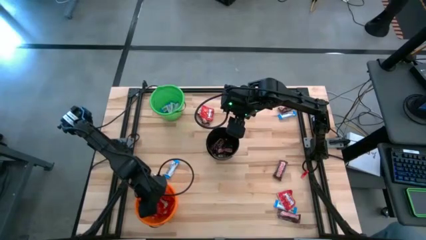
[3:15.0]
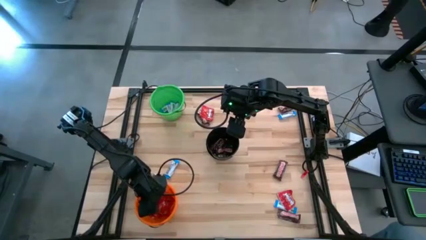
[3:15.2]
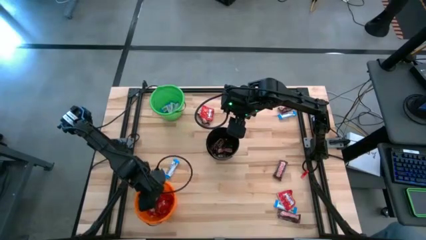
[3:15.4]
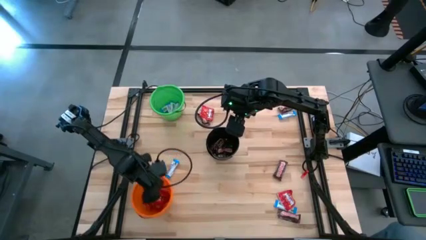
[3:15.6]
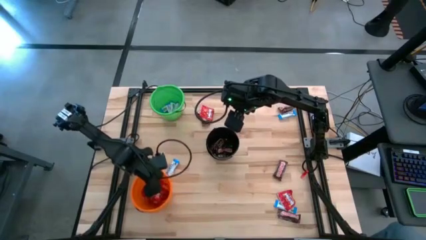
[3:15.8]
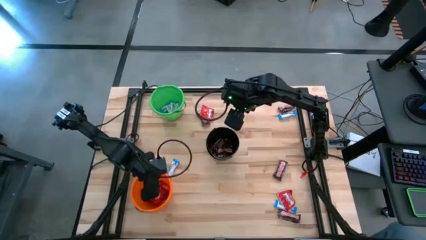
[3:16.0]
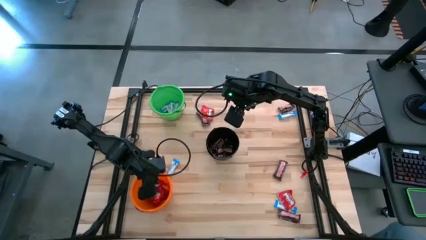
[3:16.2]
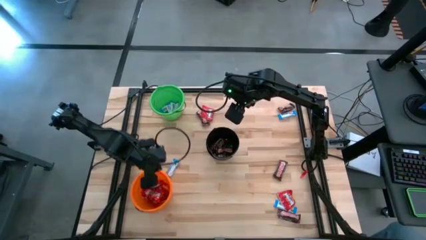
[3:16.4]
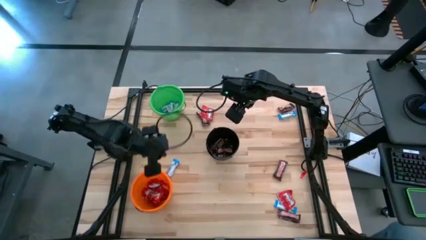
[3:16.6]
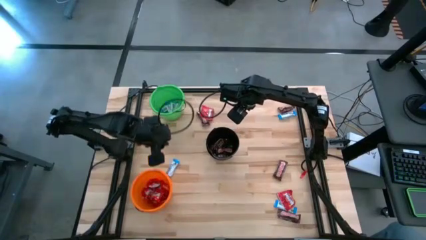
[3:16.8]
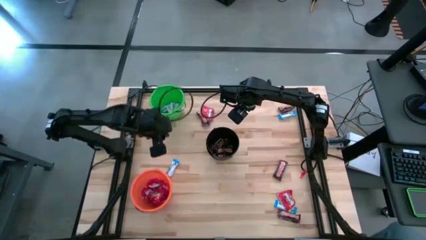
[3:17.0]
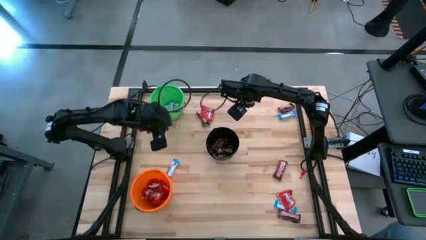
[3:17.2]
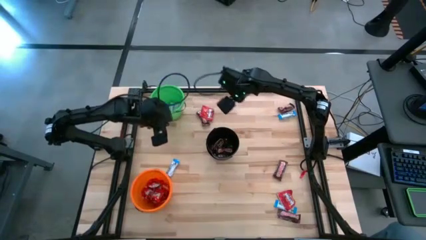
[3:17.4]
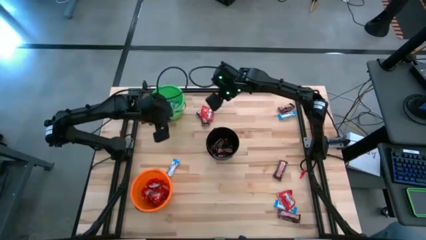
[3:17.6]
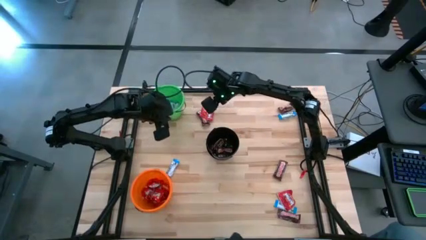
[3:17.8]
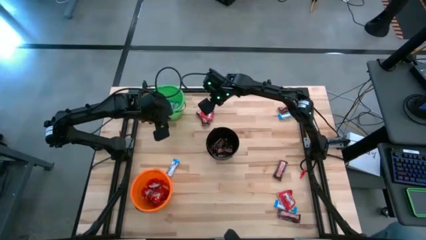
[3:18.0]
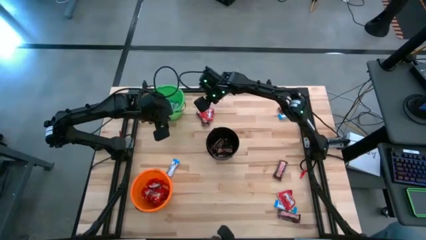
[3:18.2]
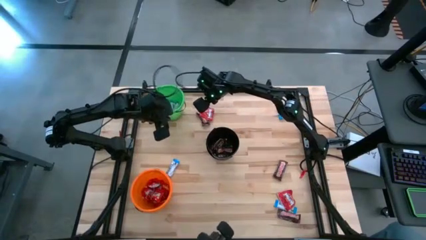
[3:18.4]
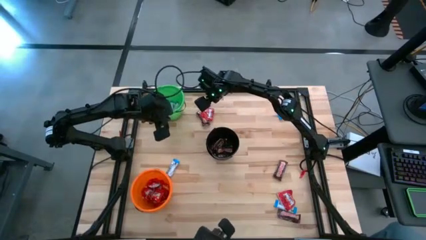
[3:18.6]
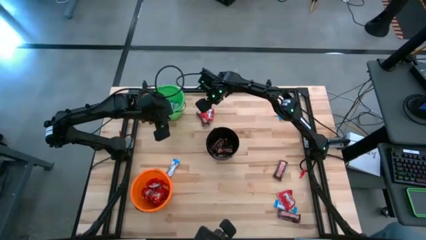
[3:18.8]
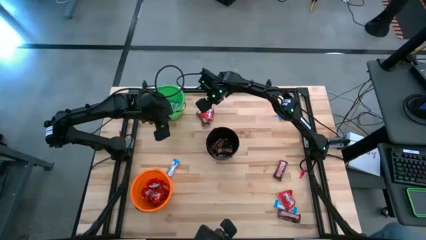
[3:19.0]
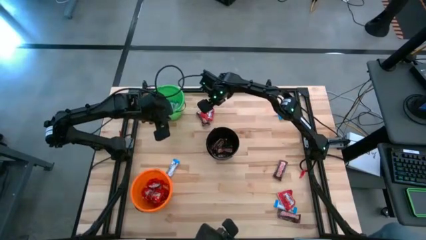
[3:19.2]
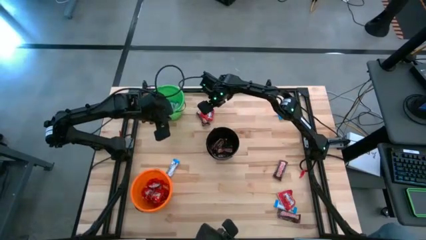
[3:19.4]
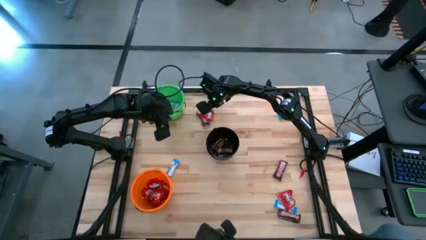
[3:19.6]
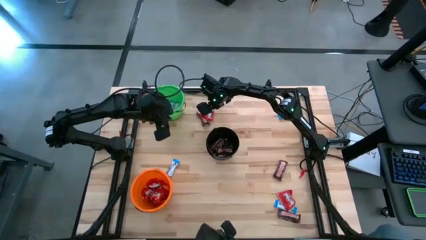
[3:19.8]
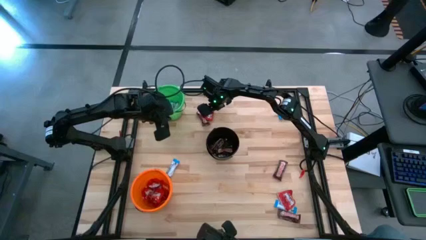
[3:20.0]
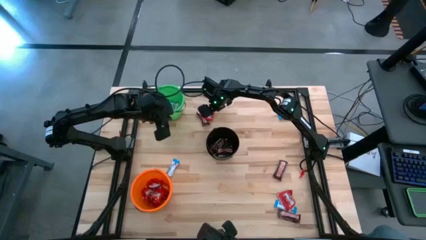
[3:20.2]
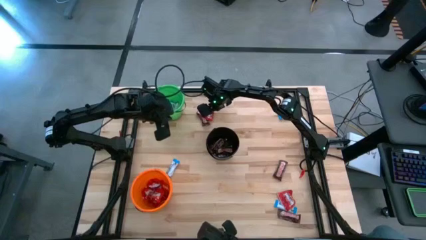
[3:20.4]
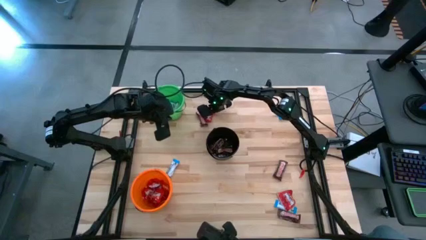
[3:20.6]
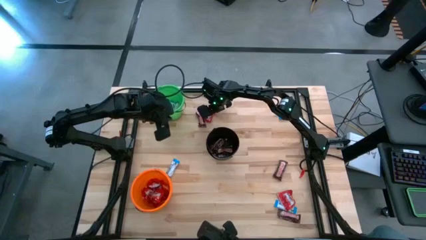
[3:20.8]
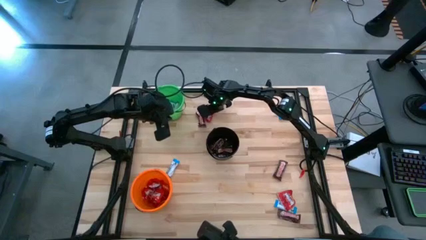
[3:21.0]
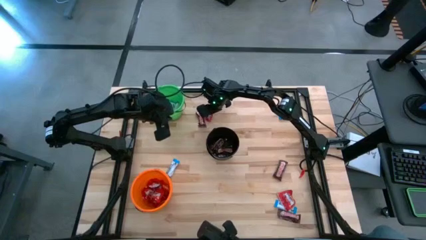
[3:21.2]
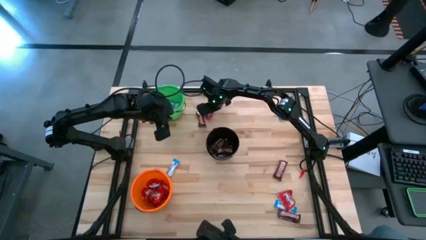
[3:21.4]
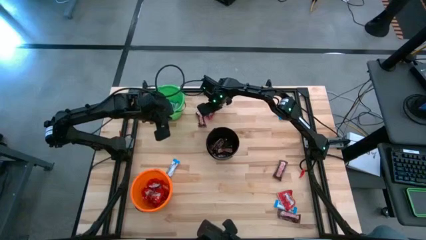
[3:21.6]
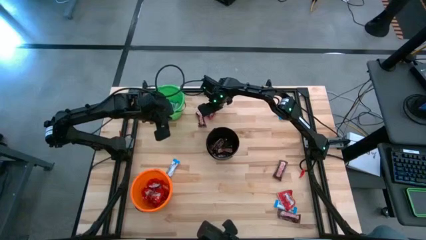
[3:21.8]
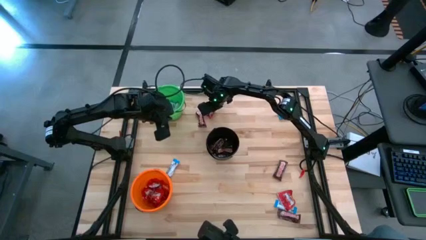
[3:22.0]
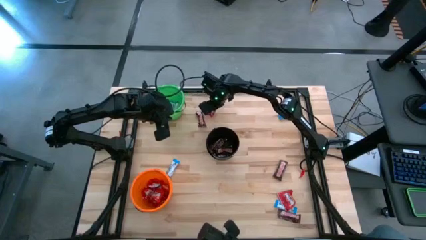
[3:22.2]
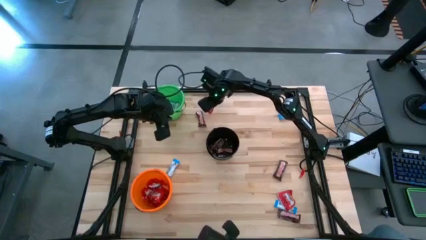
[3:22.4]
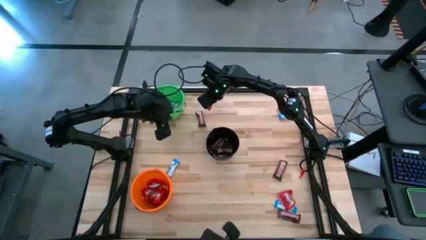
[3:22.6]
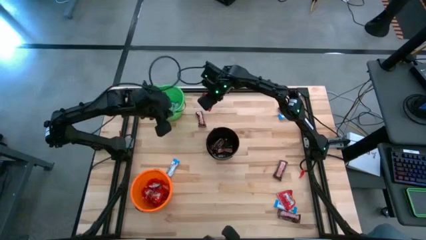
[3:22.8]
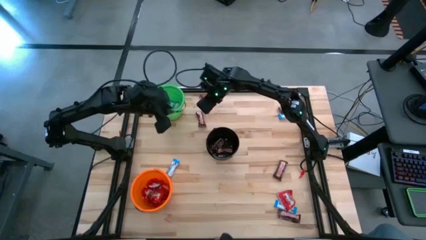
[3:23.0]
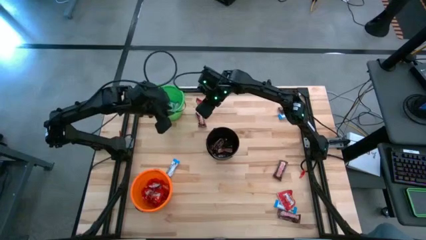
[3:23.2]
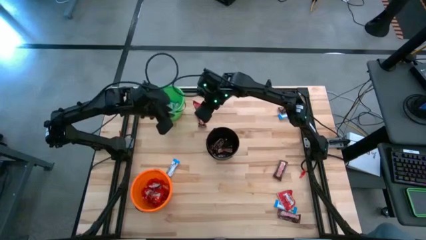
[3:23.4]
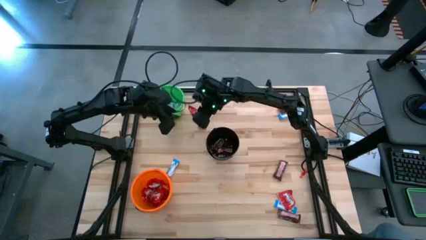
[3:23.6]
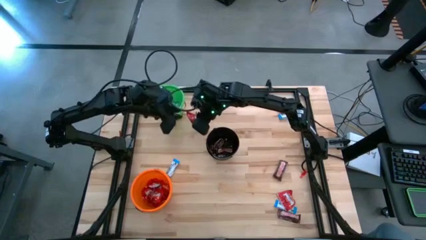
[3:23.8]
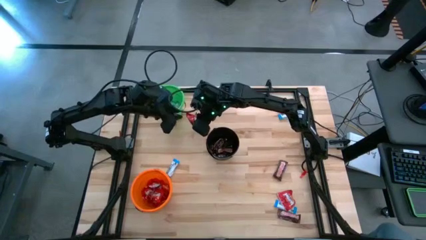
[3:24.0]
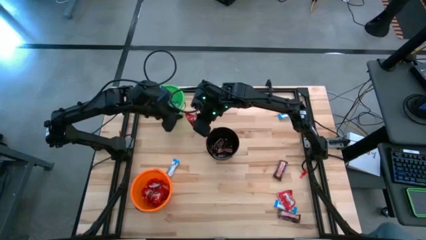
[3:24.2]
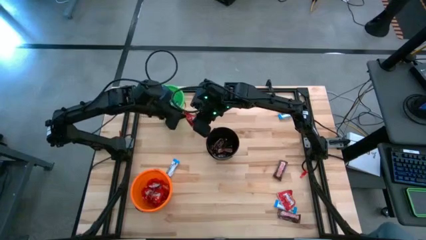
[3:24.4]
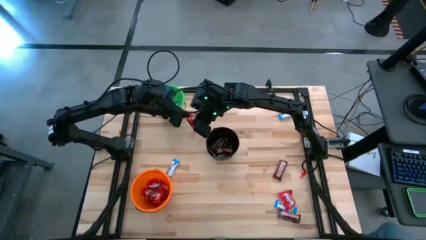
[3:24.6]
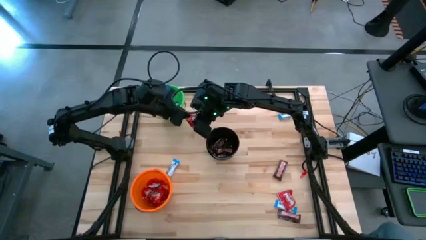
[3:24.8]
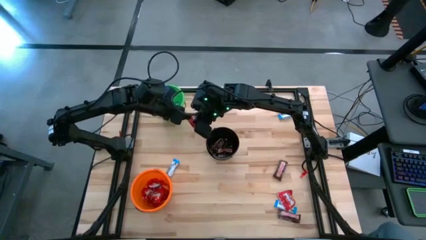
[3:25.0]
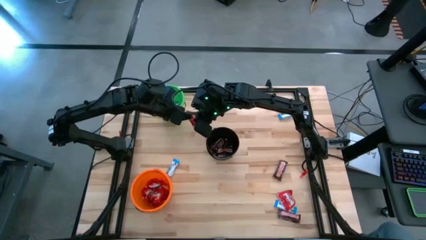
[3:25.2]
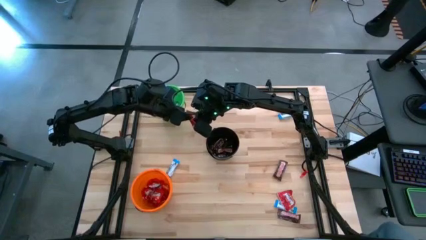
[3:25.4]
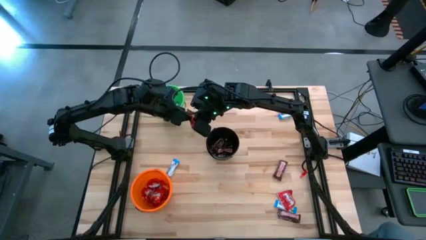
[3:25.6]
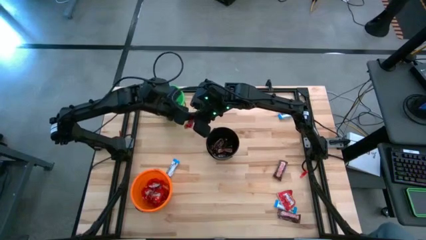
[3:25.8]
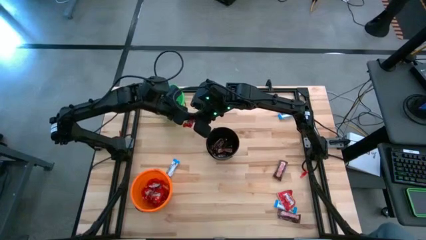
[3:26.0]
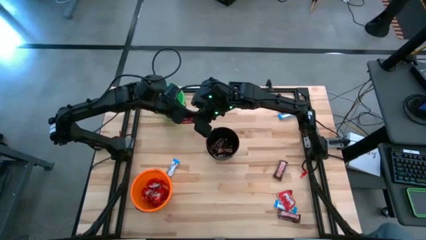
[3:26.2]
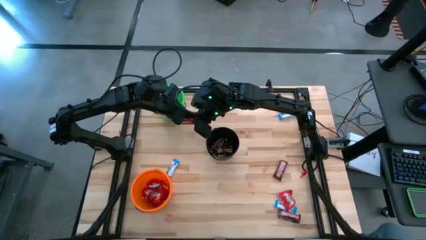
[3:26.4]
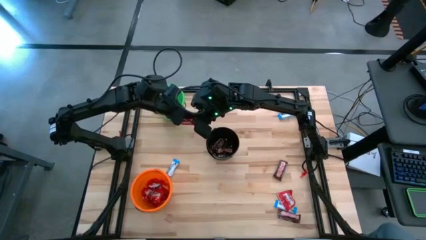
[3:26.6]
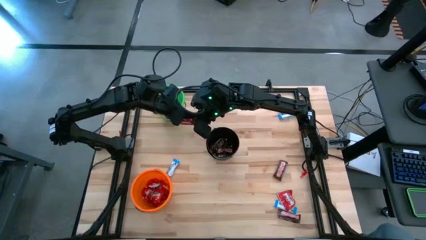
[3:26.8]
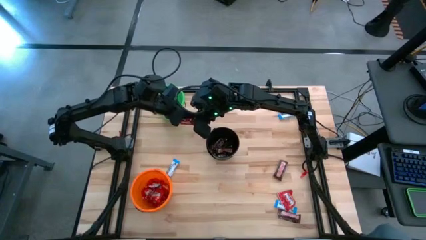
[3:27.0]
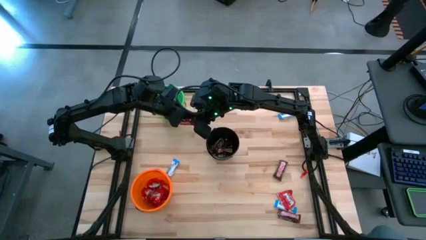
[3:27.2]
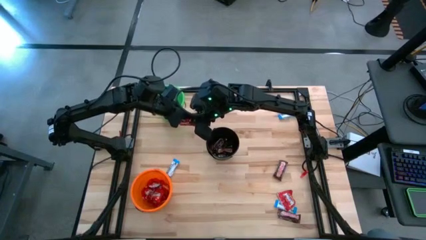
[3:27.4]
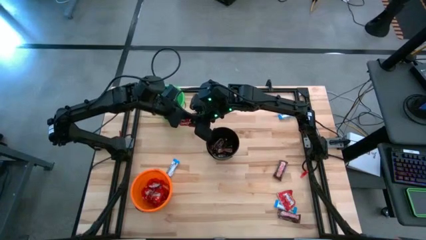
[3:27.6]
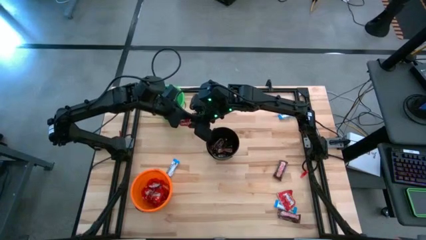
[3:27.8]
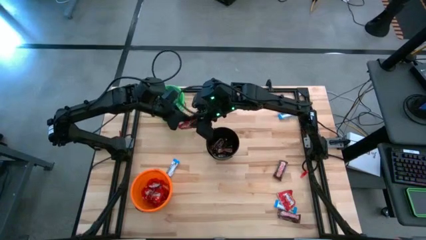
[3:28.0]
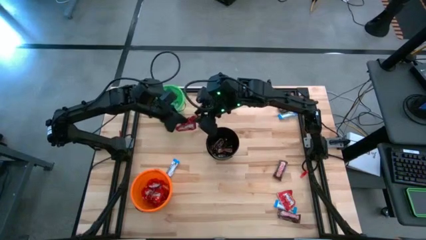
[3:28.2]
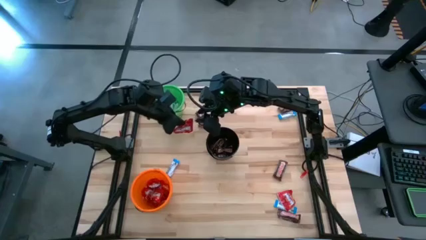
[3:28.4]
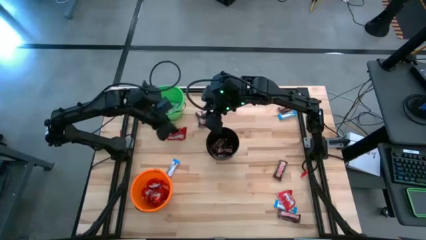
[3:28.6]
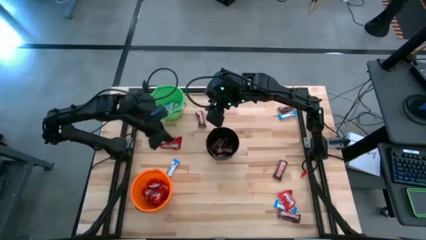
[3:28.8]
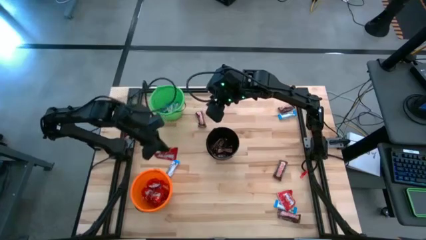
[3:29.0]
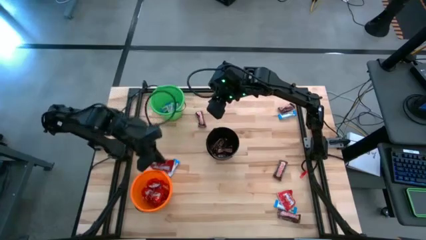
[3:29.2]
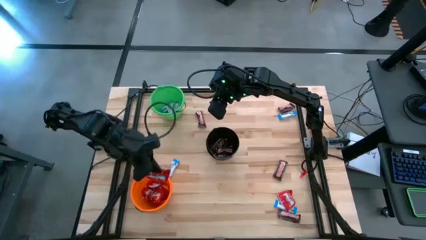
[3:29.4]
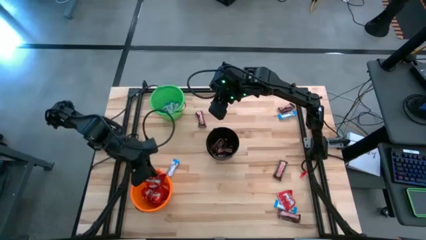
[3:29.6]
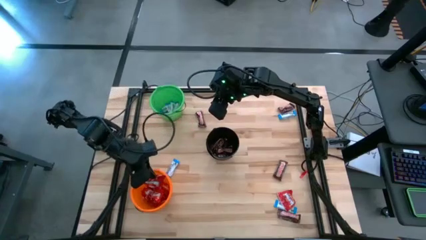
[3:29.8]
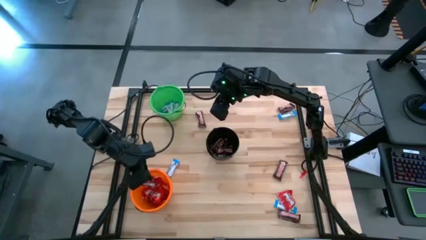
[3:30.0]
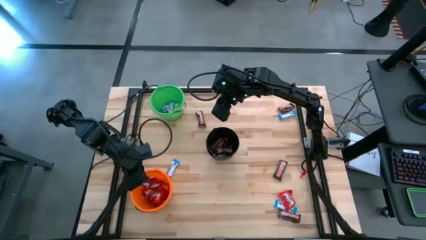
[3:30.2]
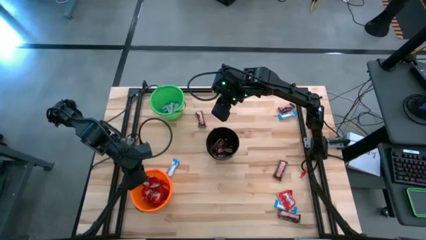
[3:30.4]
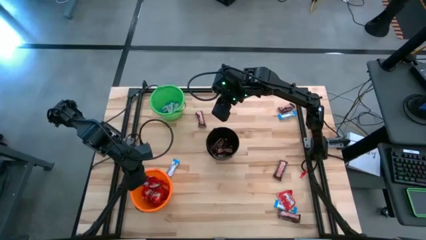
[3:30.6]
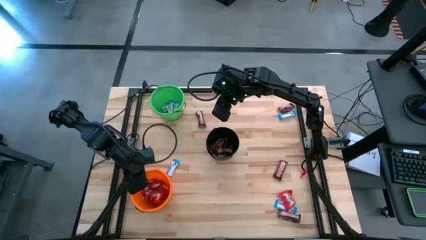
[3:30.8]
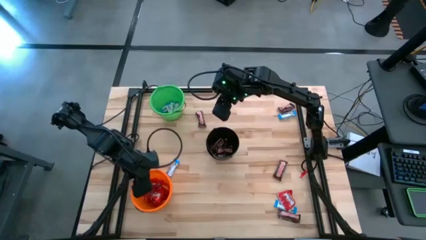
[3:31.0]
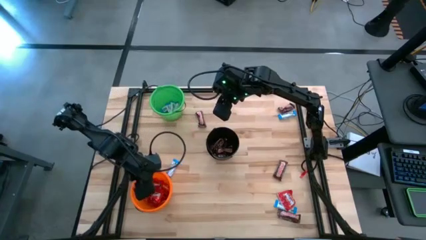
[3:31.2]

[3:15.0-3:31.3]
Task: Sort candy
Put the top red candy pack into the orange bucket
